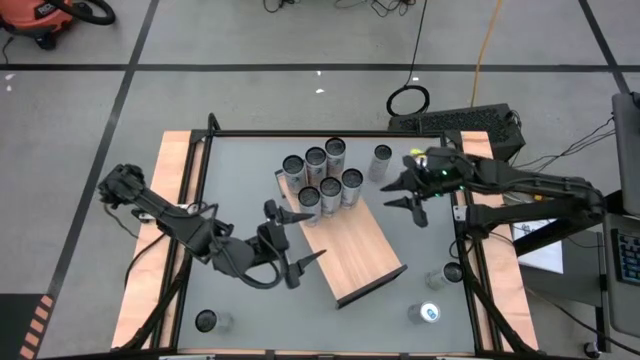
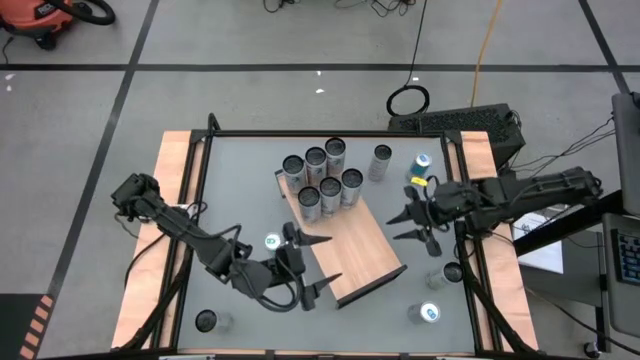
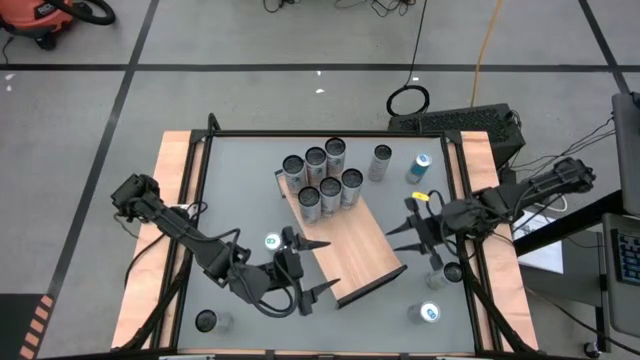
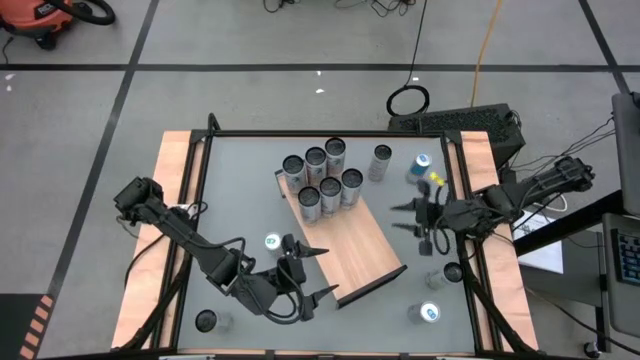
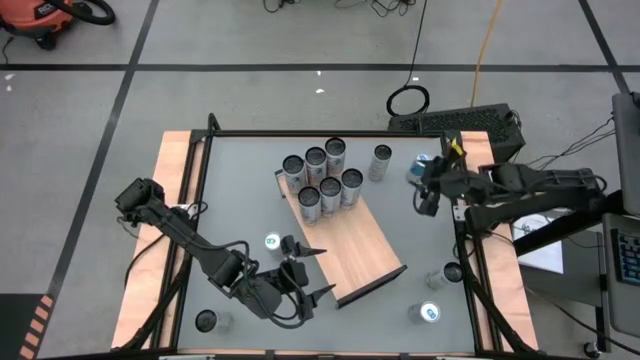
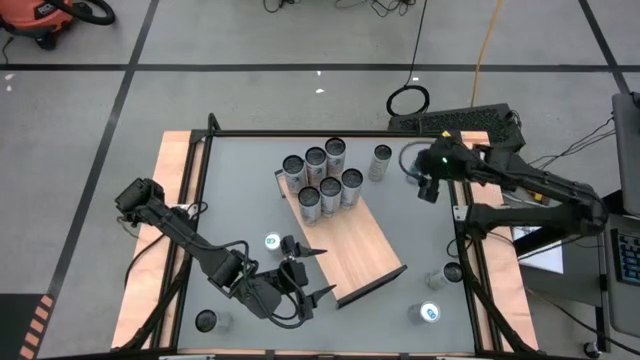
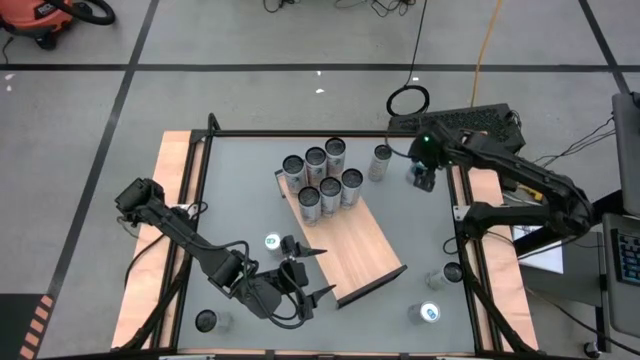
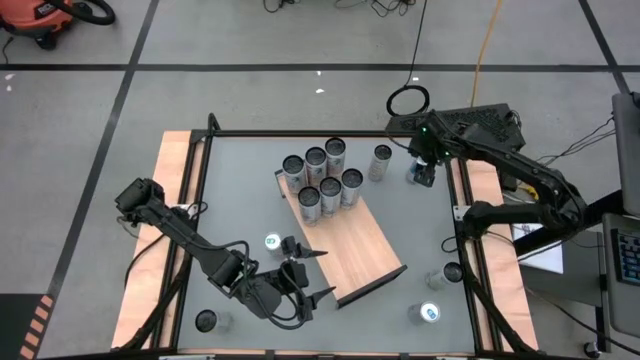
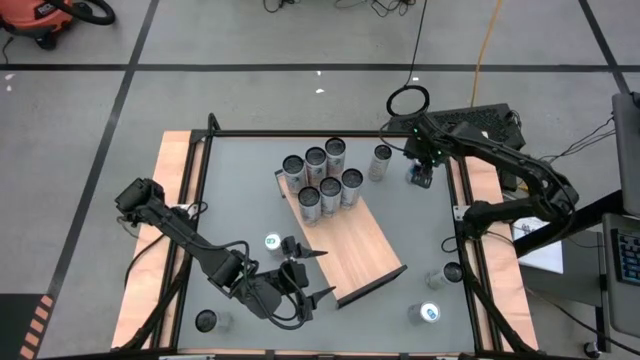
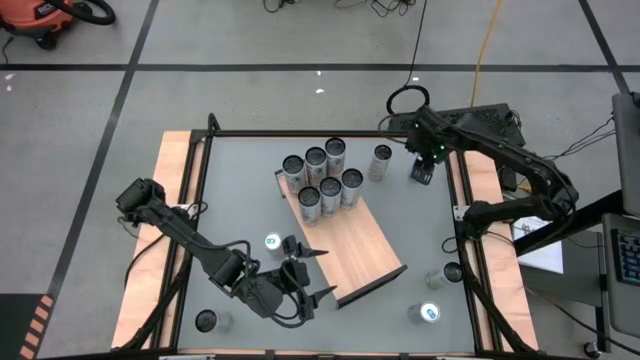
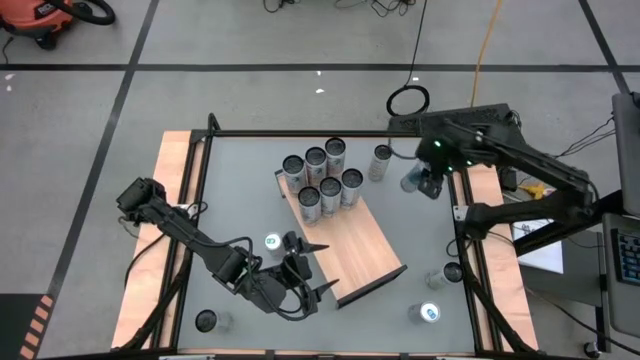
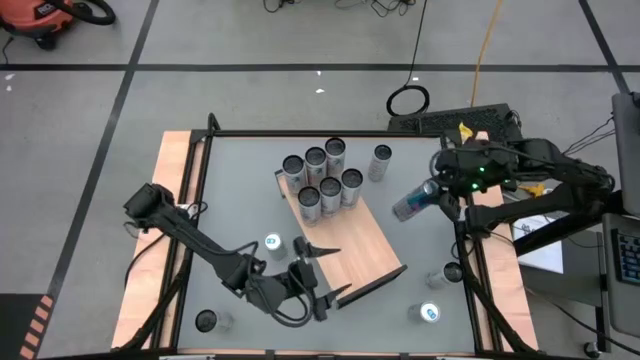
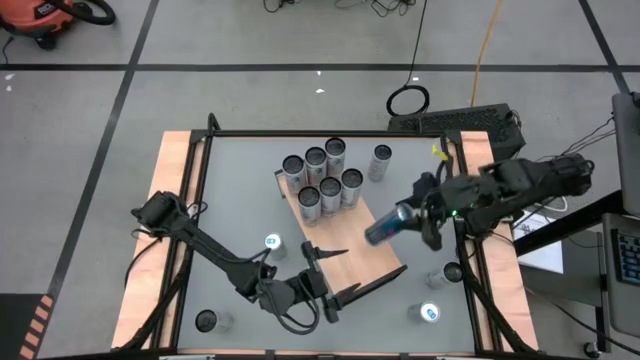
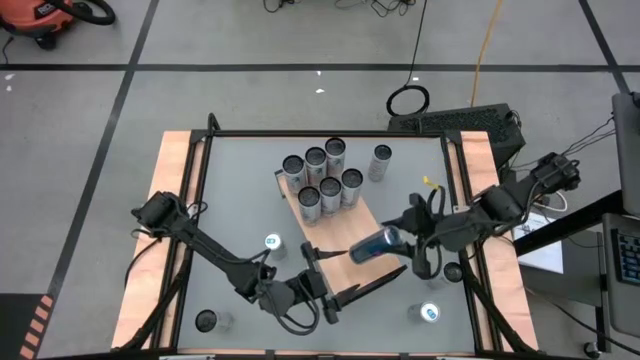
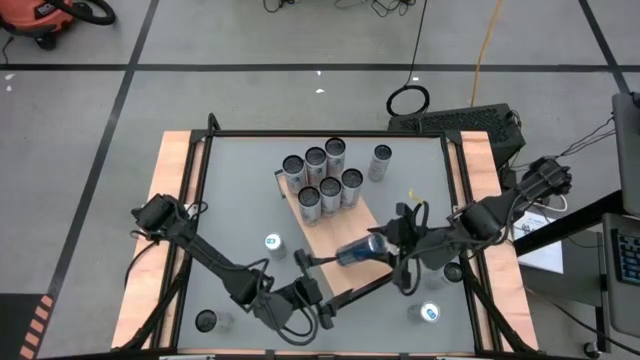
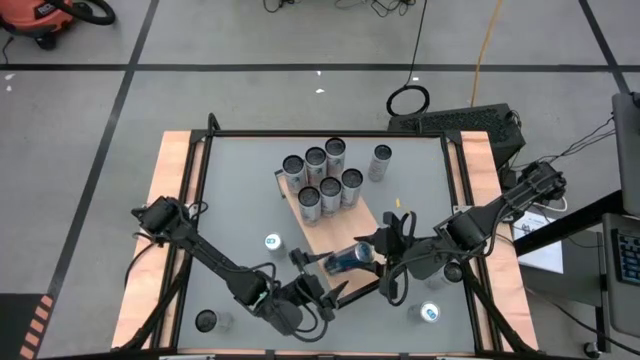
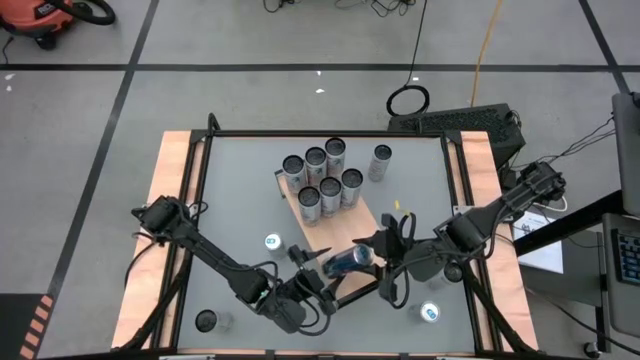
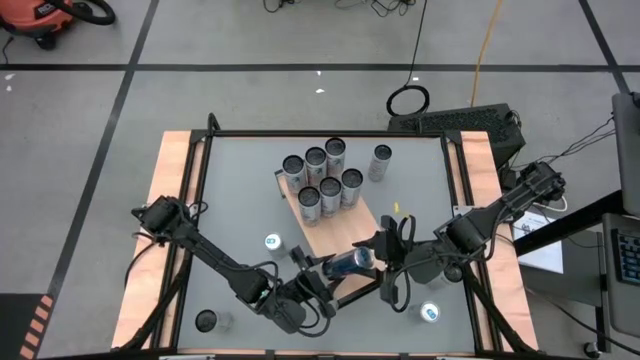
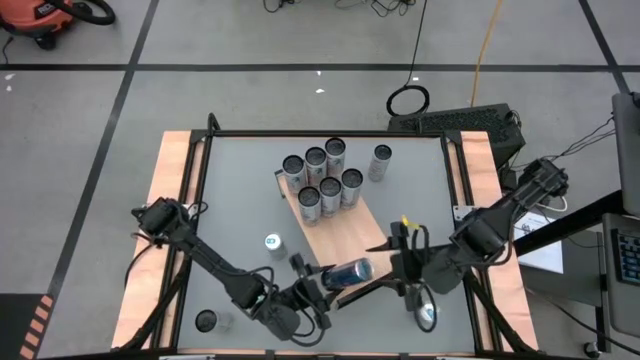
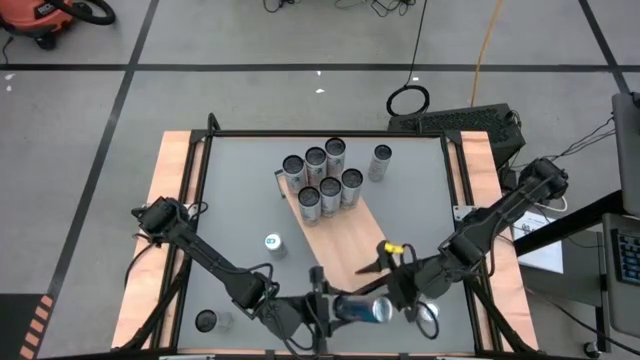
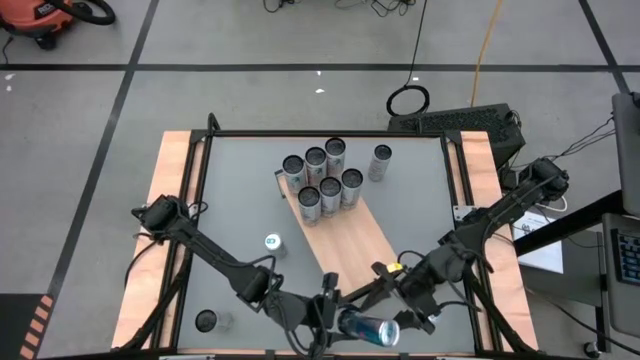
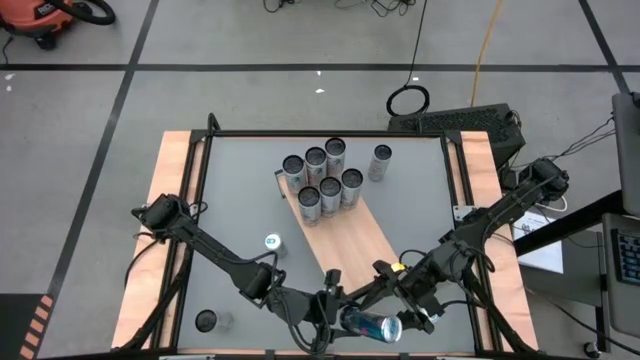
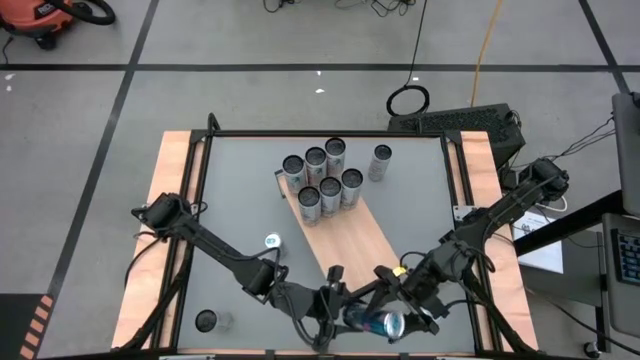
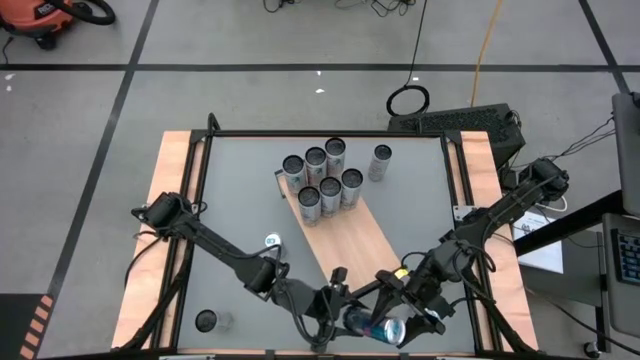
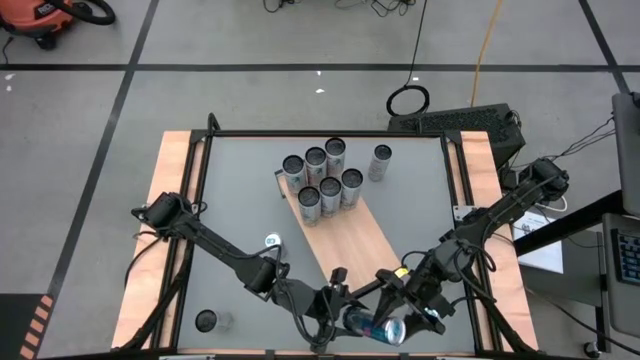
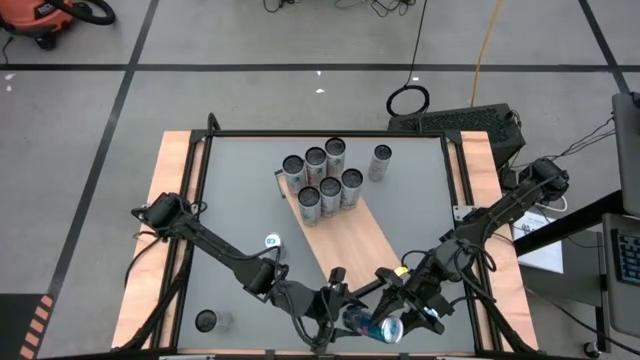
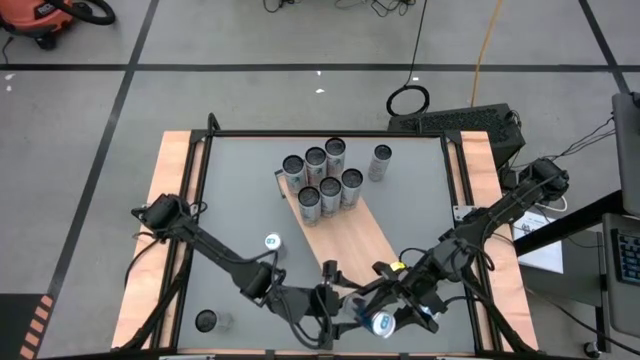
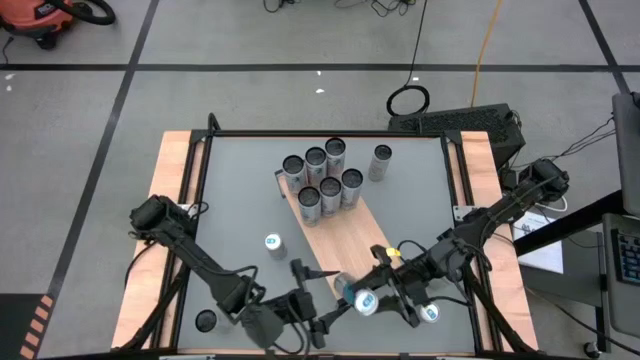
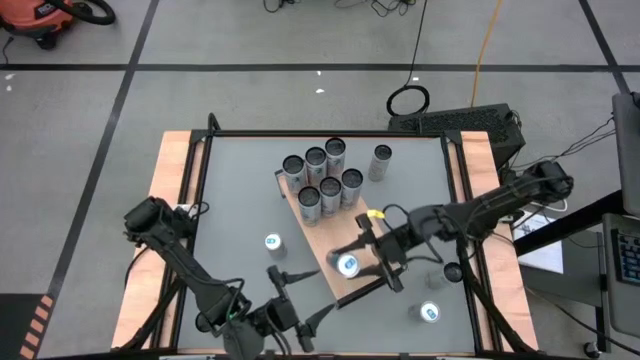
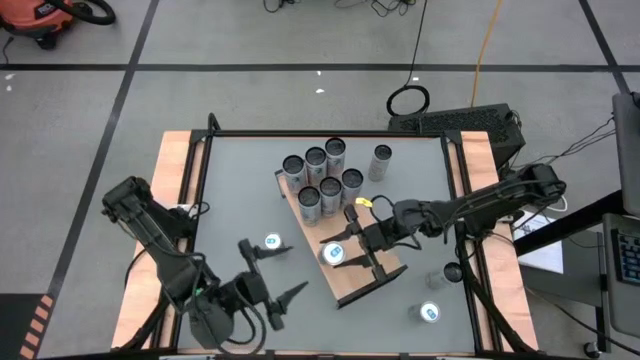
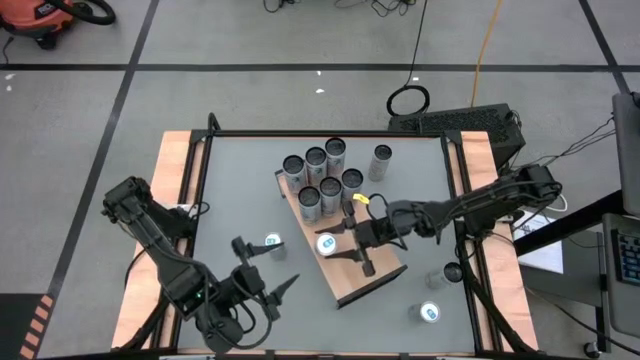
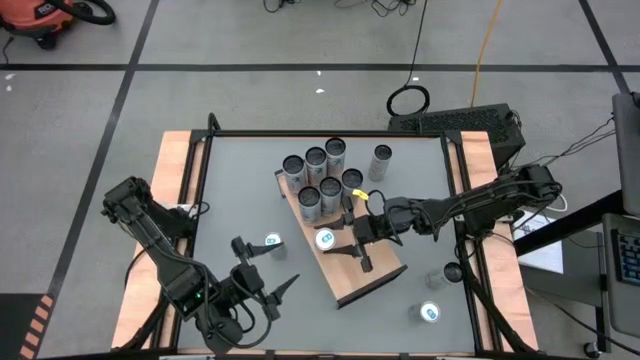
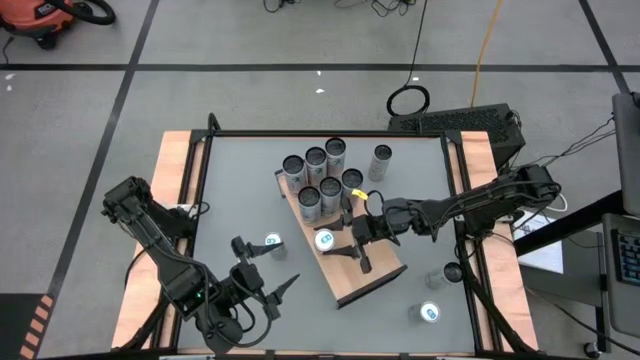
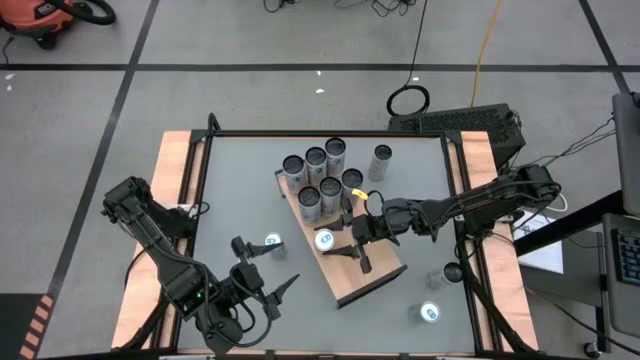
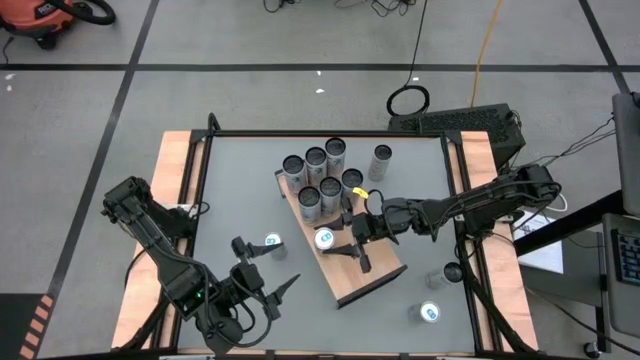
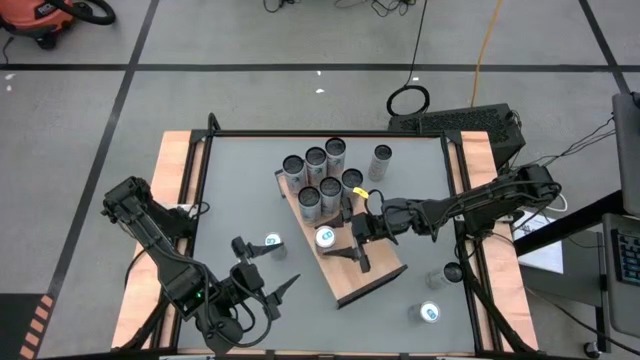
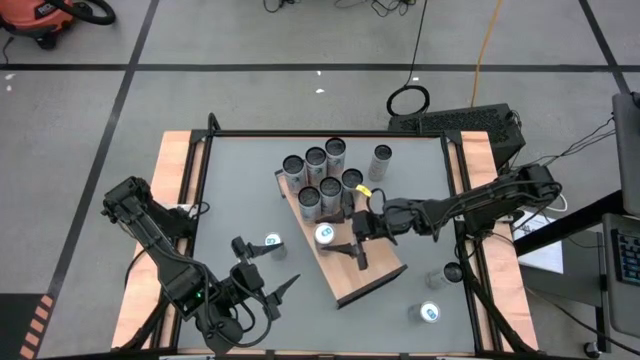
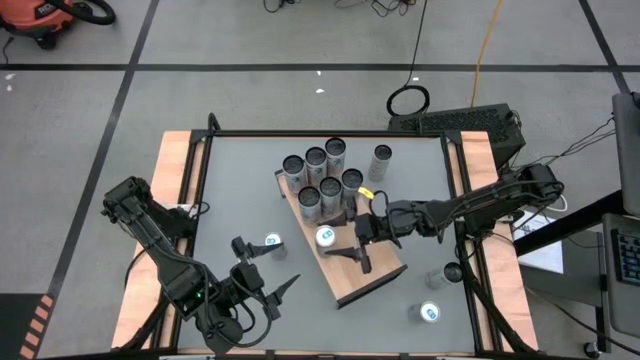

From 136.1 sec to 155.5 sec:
Task: Place canned beverage on shelf
Put the top right blue soda can on the shelf
